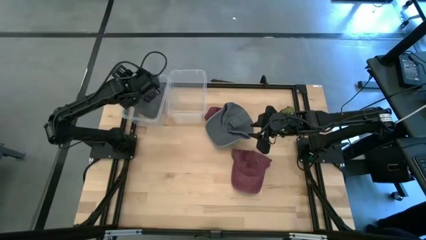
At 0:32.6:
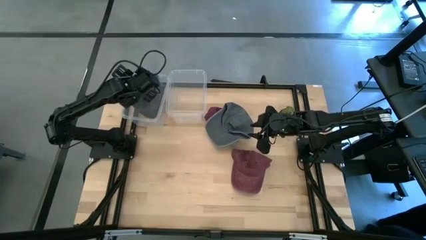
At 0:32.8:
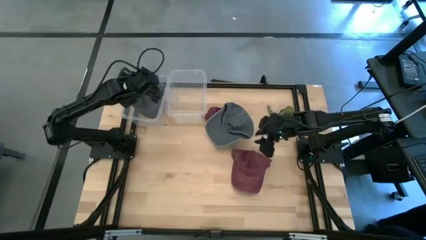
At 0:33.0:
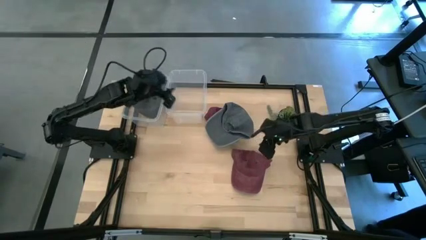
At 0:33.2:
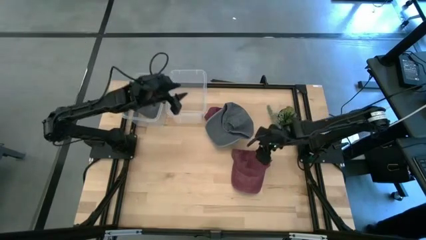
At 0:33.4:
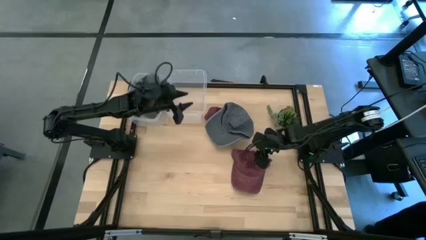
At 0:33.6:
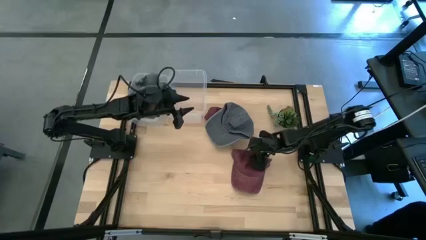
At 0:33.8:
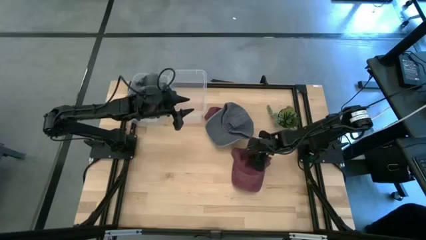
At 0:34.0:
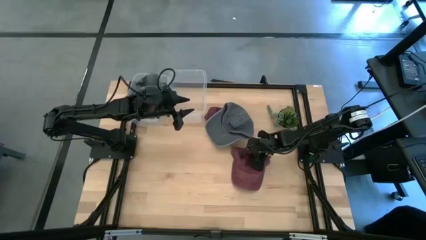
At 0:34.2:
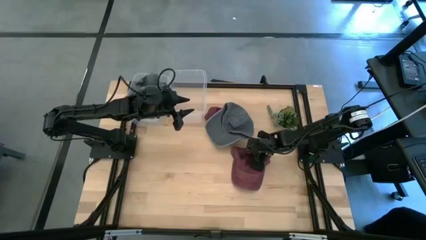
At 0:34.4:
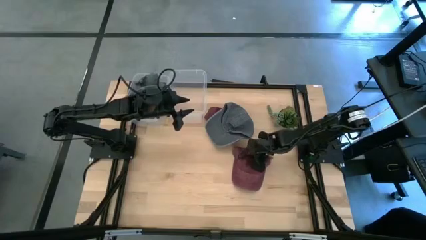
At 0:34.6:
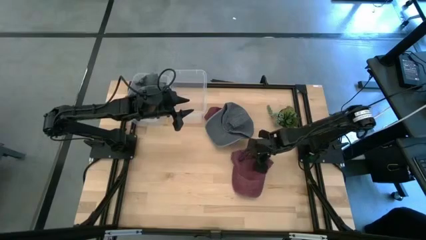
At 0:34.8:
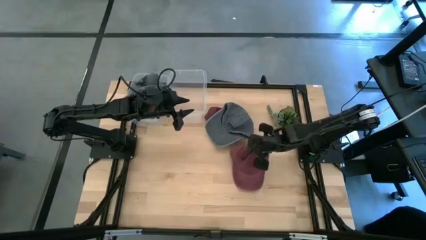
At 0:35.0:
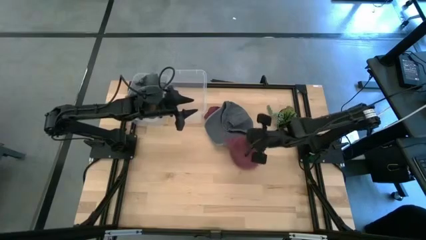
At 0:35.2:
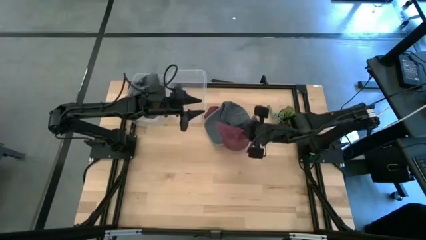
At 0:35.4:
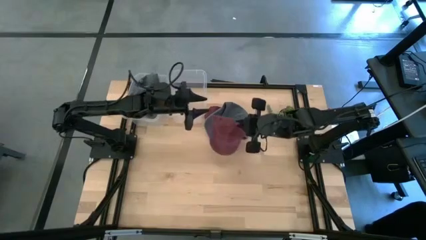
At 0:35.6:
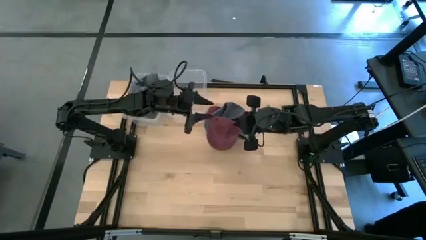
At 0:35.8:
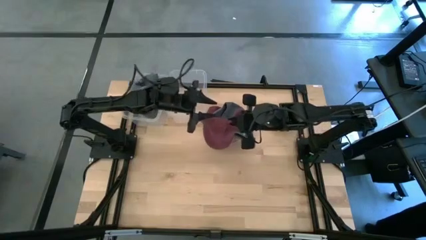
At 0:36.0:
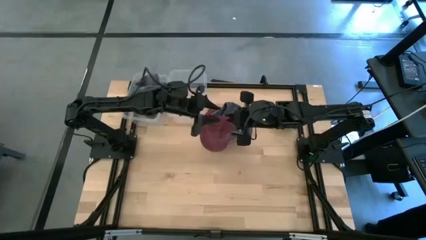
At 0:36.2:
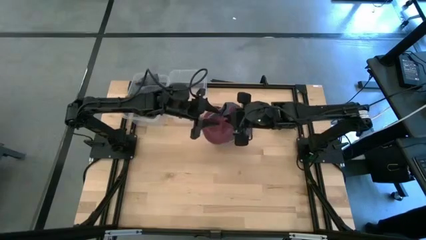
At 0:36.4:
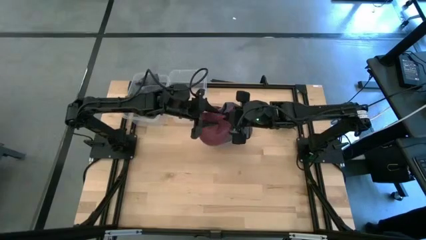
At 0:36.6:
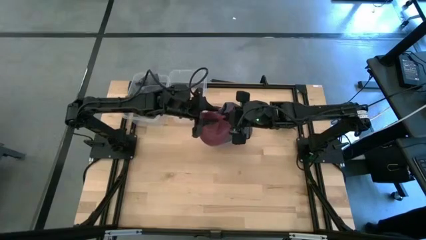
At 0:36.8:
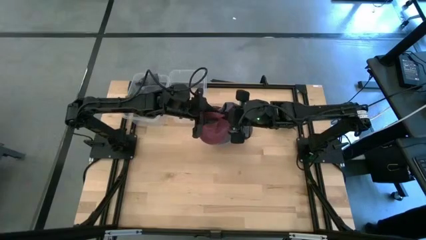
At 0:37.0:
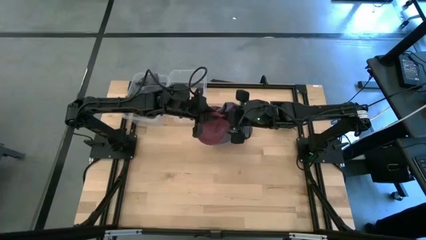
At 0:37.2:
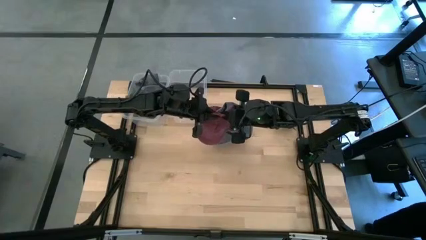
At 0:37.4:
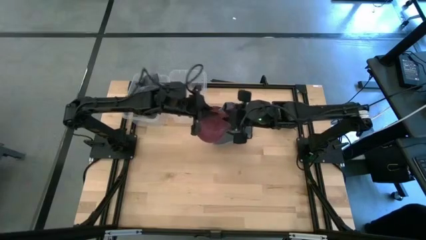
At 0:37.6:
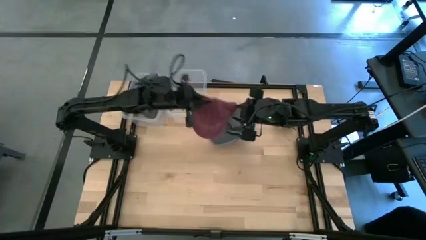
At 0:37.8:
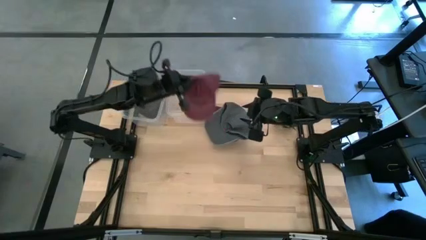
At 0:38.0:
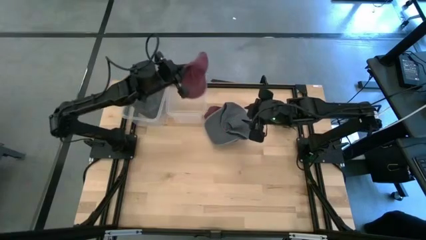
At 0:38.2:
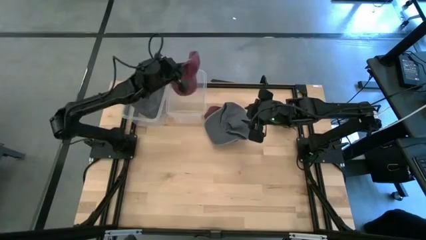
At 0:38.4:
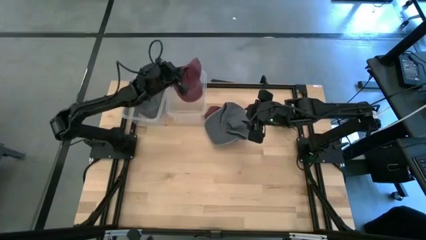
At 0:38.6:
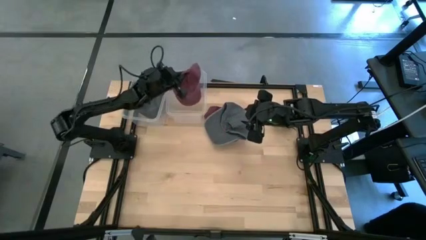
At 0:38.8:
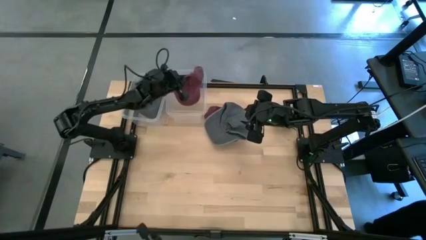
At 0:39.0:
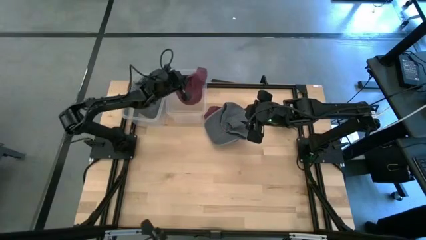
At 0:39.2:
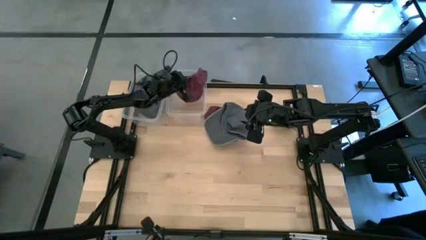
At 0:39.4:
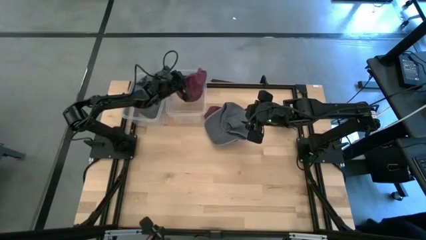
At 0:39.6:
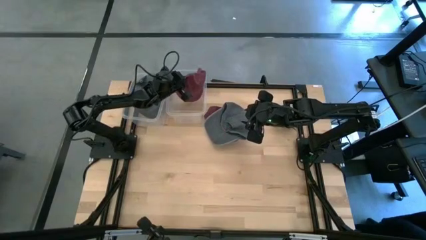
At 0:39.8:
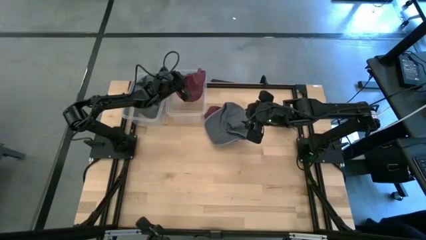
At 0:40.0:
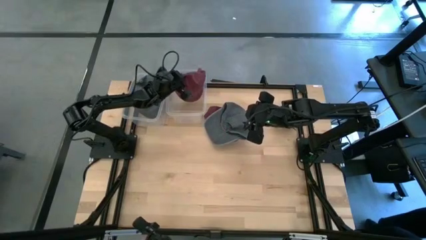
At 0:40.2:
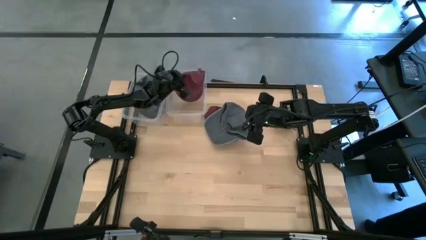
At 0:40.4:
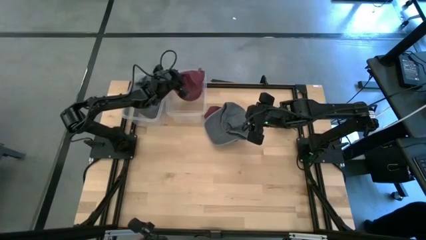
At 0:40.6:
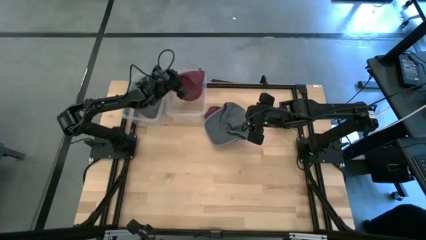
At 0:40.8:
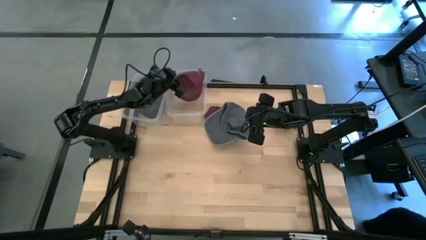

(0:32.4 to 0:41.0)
Task: Pick & Place hat
Put the bottom red cap into the right transparent bin

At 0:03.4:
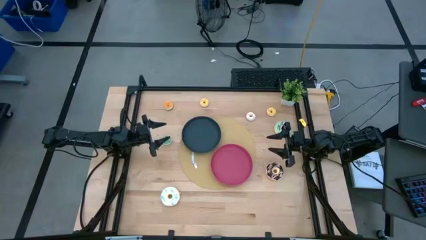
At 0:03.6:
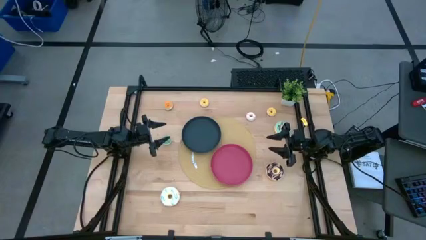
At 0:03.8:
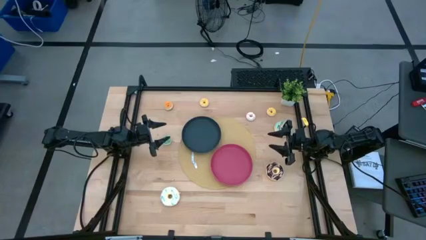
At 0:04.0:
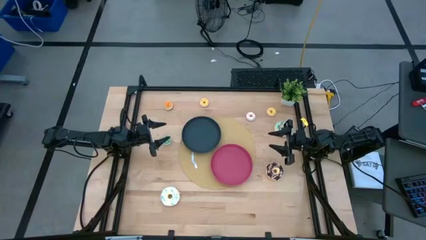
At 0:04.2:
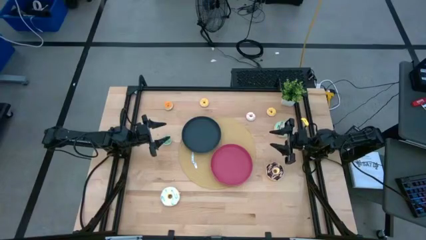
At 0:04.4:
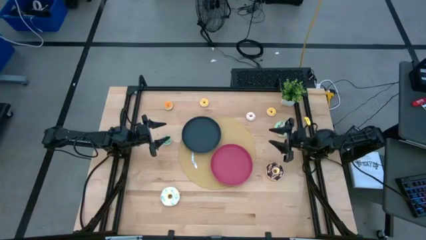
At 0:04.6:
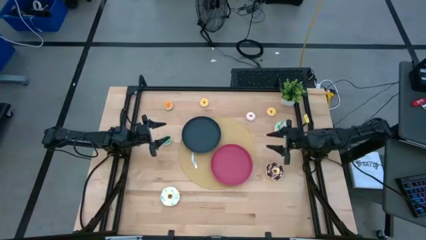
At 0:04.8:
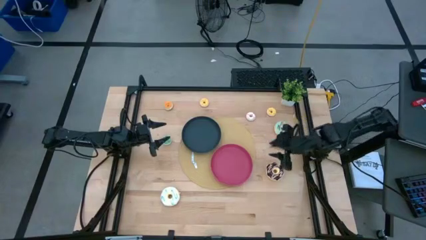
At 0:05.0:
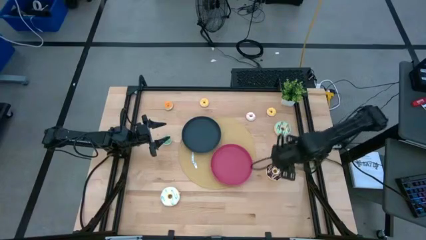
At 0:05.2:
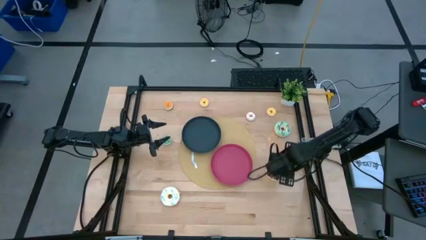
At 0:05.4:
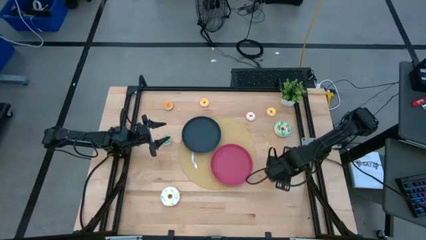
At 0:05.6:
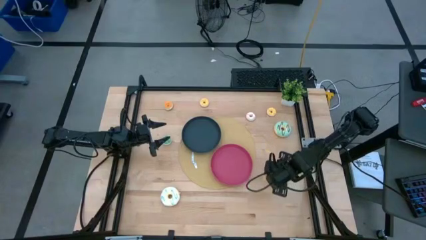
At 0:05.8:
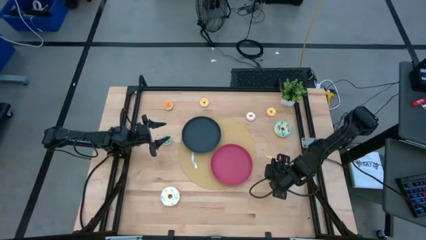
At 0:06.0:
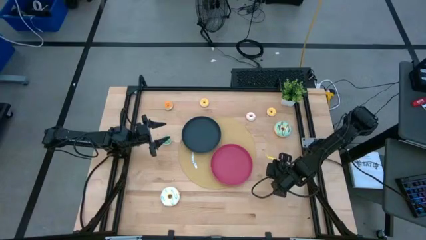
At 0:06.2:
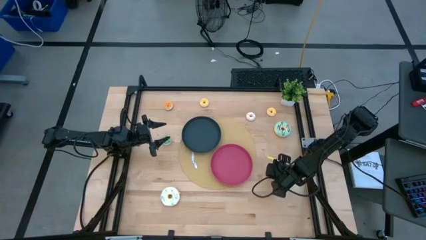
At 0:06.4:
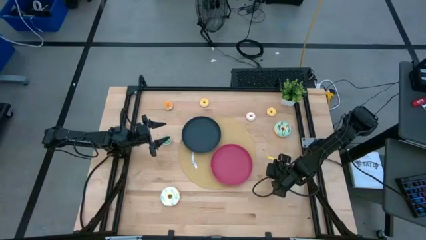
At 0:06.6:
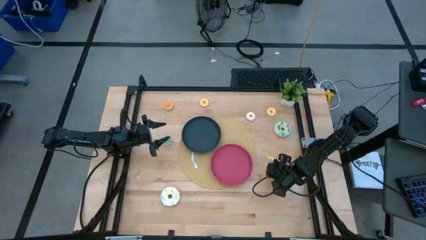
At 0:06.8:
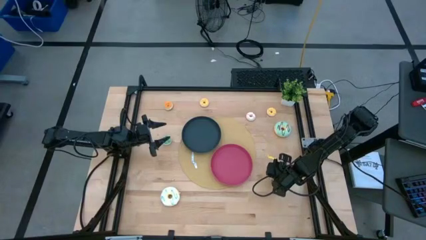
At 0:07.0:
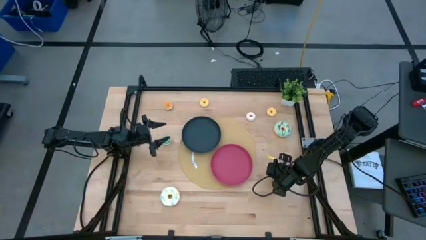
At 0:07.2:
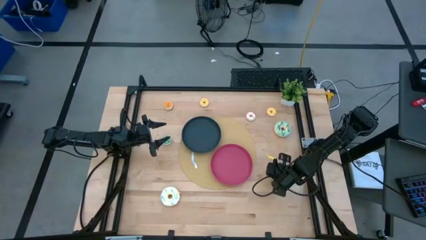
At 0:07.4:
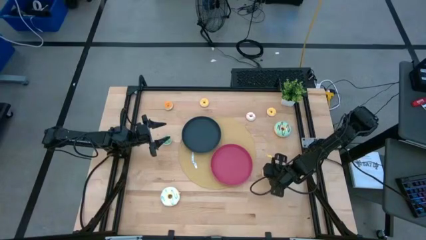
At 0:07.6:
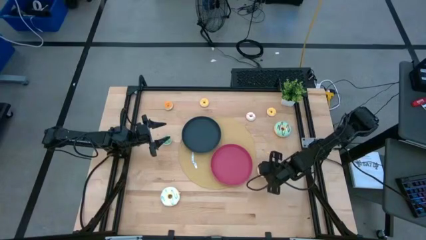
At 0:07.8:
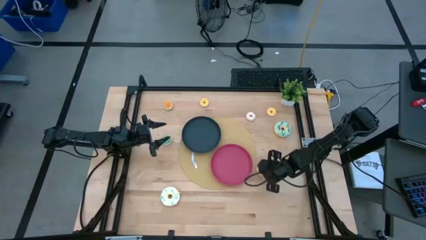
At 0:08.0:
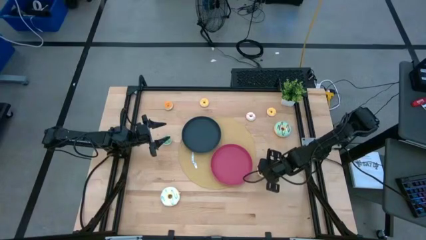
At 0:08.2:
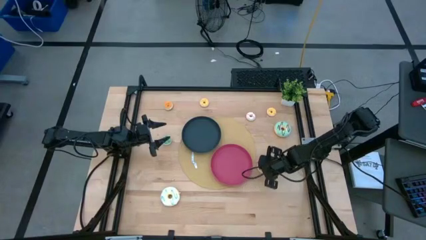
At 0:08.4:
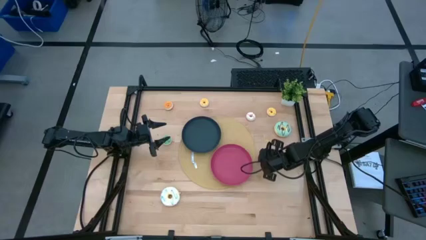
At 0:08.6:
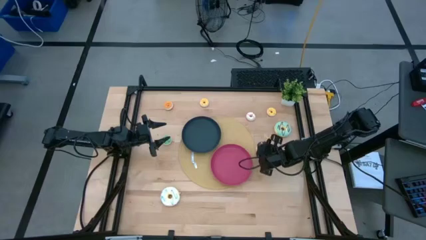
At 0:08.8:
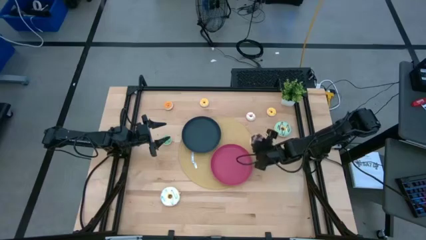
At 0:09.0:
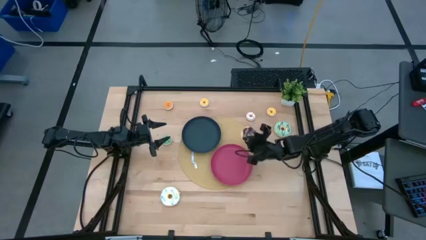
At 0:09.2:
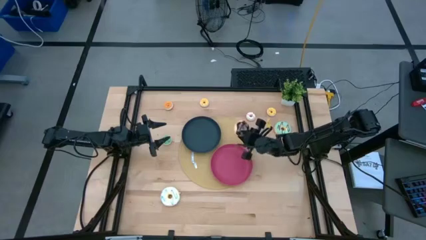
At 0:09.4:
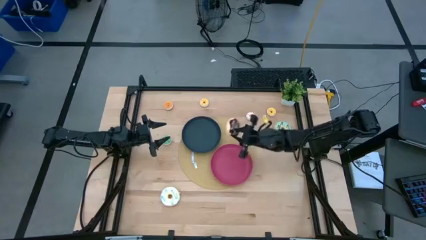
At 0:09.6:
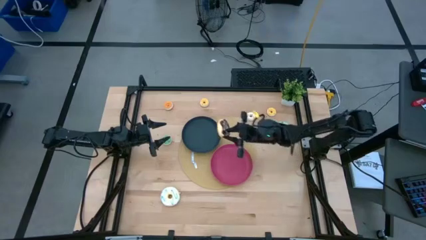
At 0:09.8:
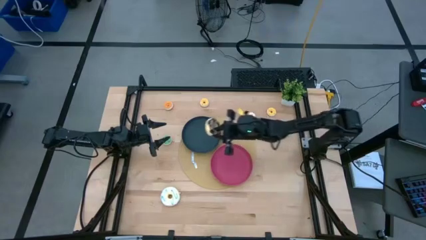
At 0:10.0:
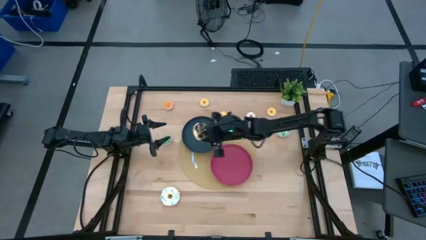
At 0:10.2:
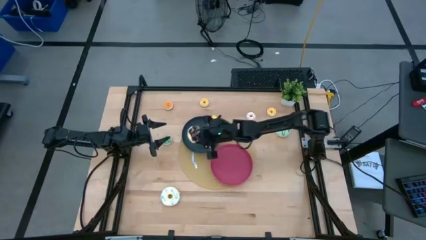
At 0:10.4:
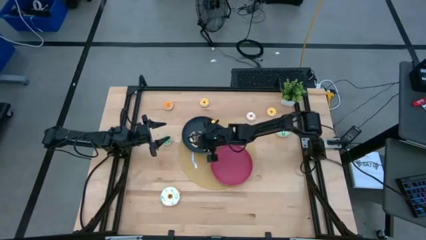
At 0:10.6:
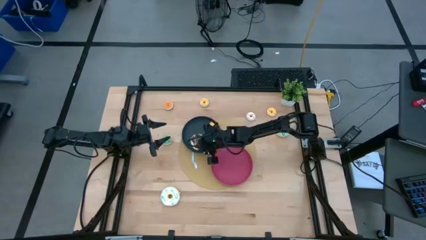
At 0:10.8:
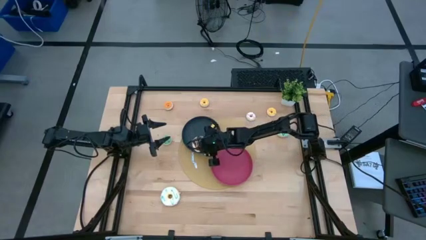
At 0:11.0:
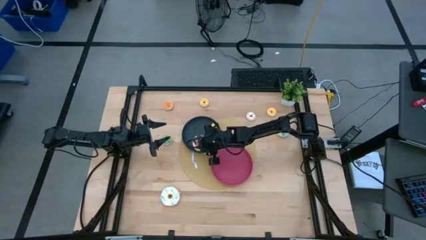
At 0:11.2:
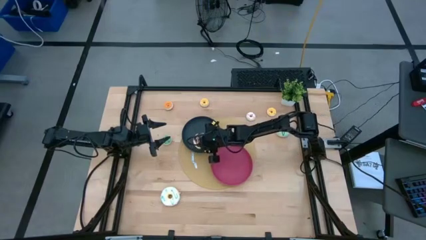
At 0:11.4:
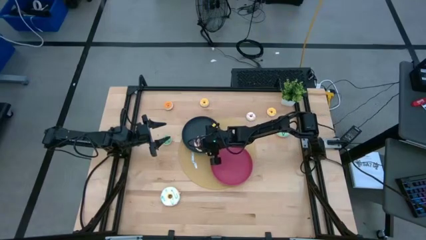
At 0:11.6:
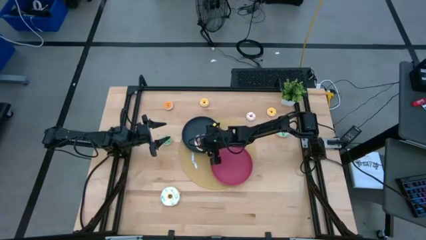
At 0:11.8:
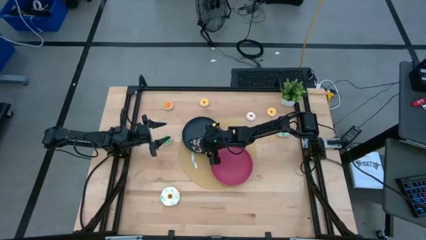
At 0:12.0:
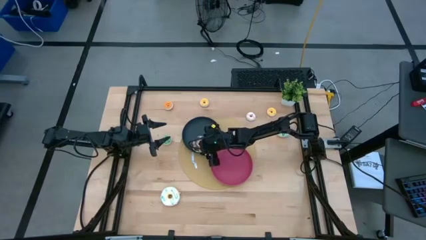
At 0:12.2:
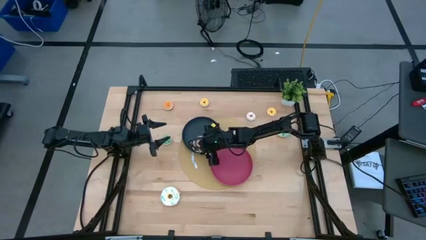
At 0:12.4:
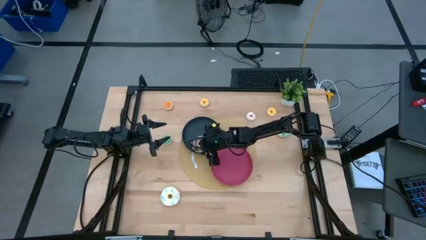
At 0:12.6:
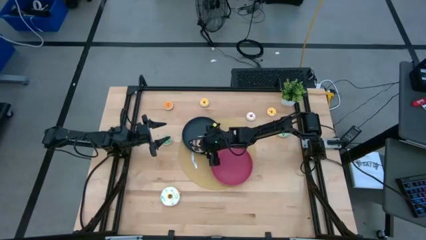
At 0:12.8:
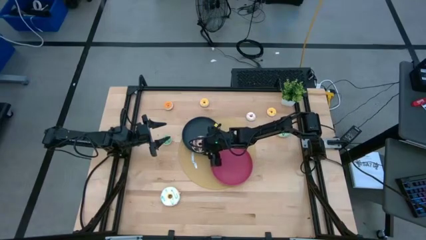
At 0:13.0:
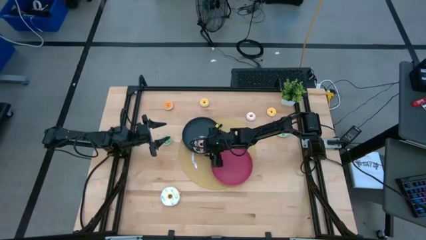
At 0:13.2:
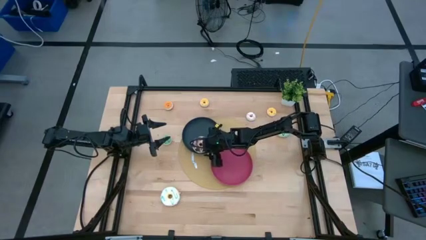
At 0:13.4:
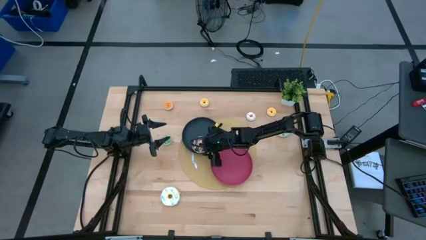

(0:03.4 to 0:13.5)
Task: Pick & Place donuts
Put the large black donut on the black plate
